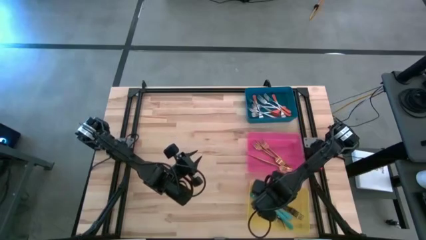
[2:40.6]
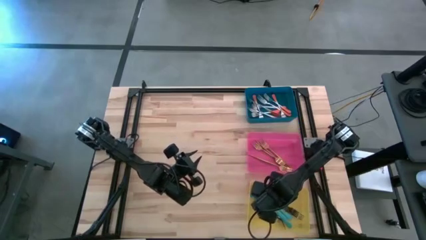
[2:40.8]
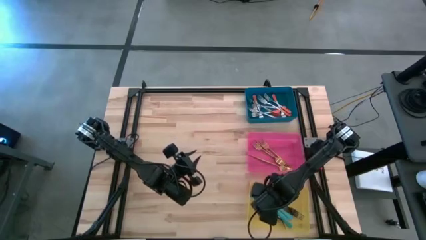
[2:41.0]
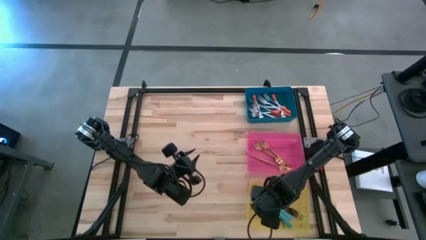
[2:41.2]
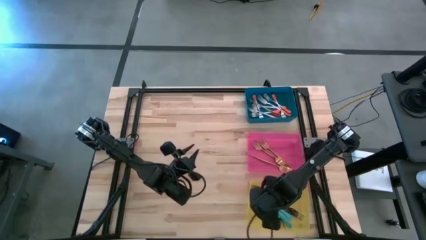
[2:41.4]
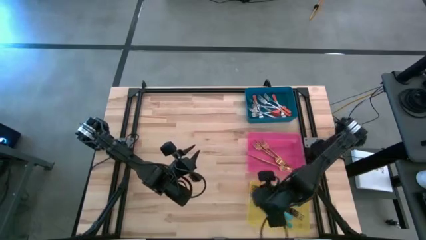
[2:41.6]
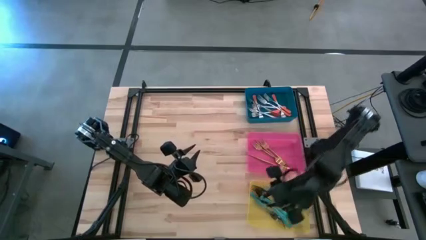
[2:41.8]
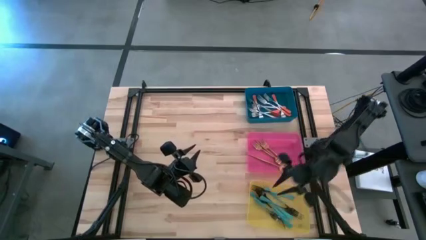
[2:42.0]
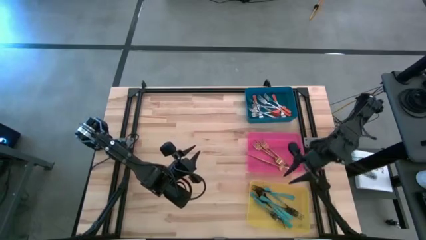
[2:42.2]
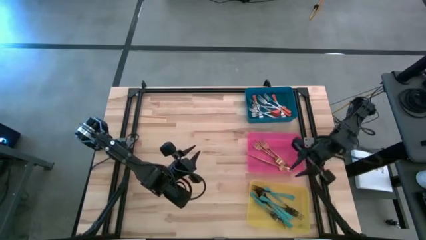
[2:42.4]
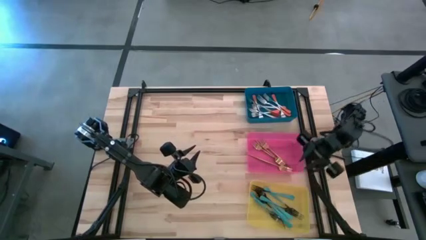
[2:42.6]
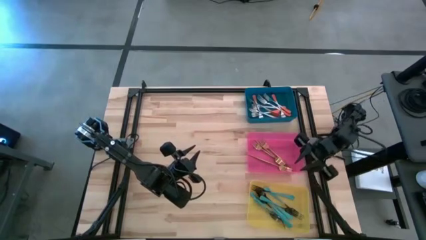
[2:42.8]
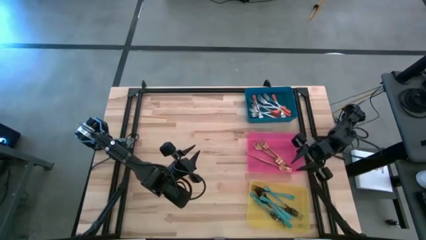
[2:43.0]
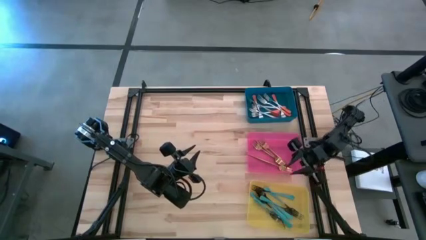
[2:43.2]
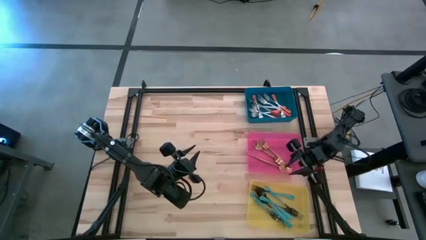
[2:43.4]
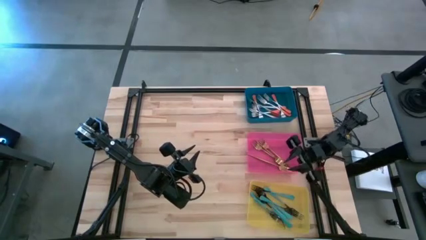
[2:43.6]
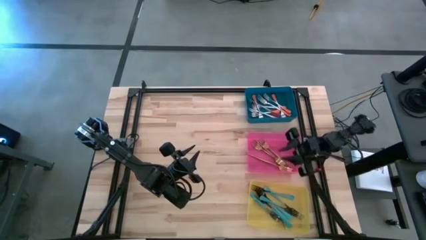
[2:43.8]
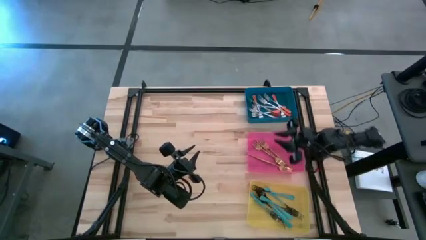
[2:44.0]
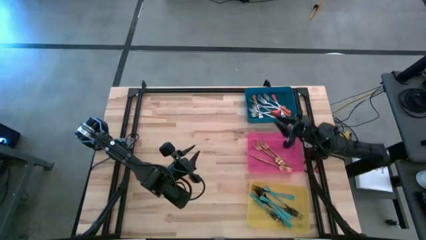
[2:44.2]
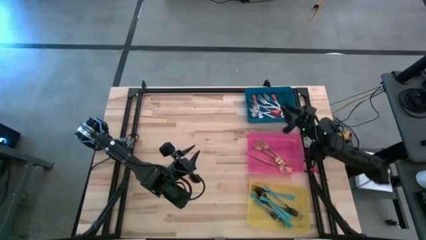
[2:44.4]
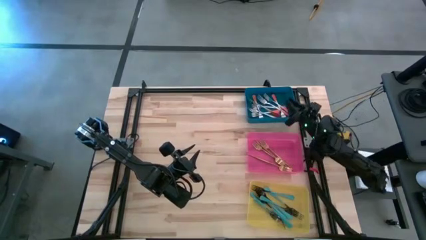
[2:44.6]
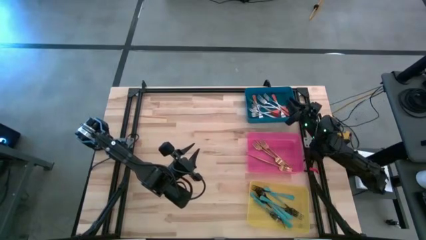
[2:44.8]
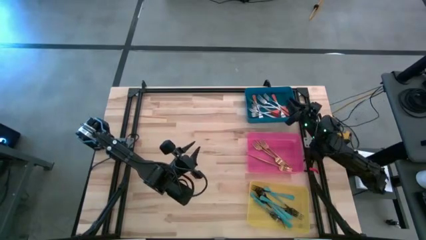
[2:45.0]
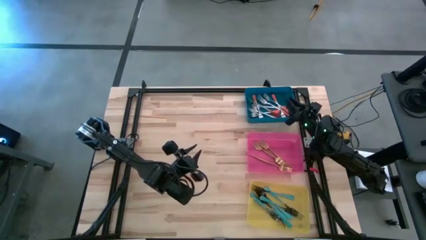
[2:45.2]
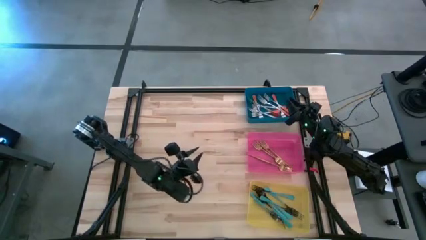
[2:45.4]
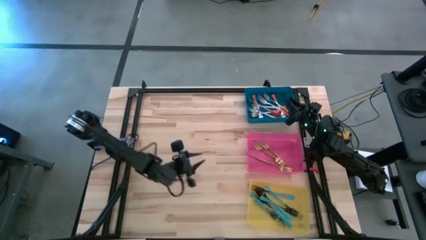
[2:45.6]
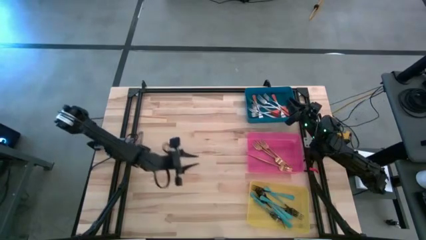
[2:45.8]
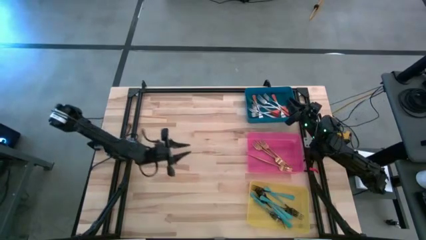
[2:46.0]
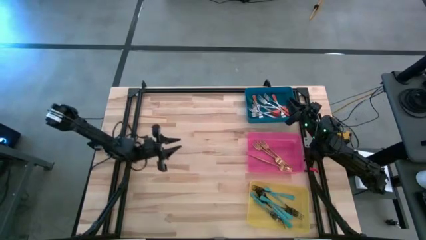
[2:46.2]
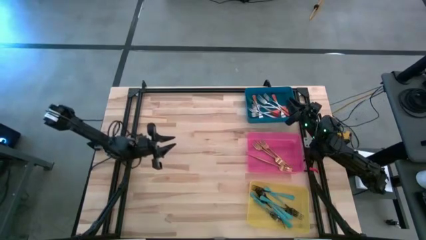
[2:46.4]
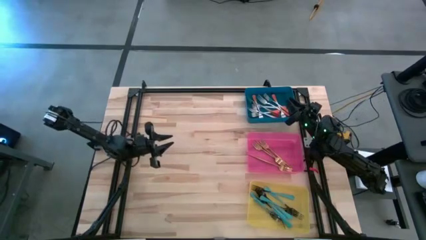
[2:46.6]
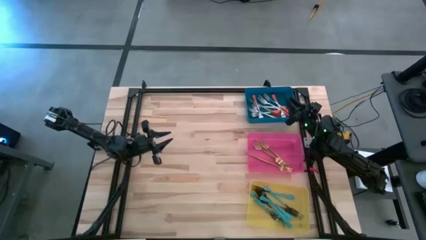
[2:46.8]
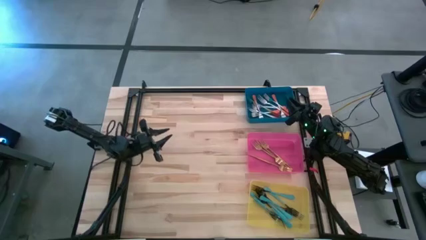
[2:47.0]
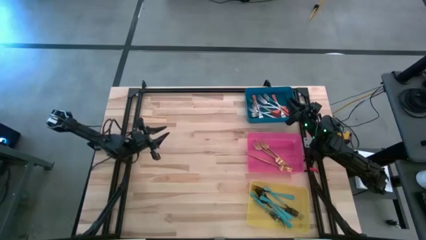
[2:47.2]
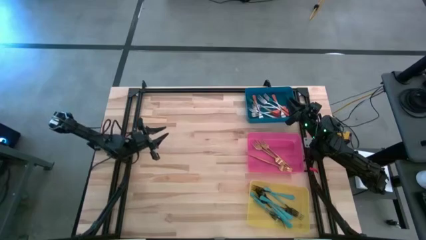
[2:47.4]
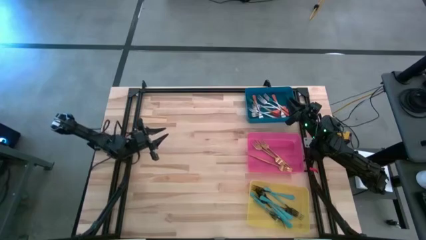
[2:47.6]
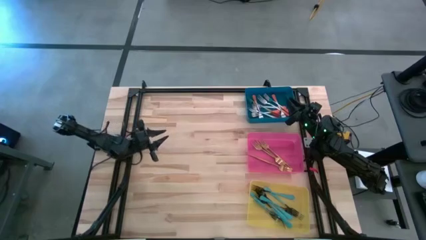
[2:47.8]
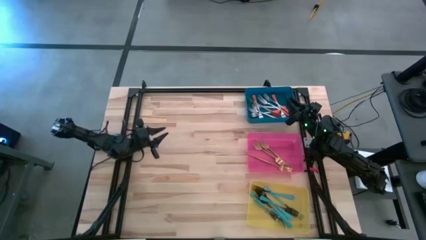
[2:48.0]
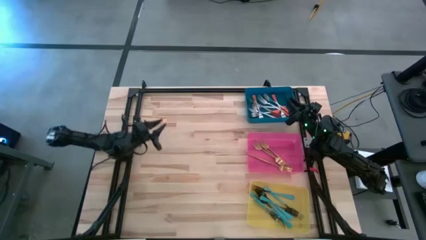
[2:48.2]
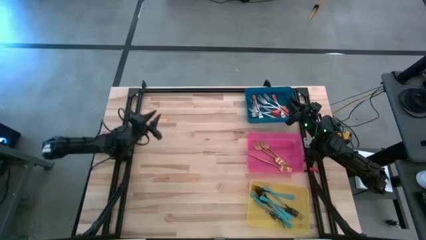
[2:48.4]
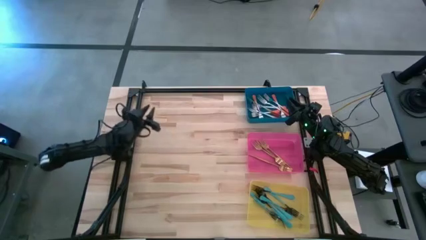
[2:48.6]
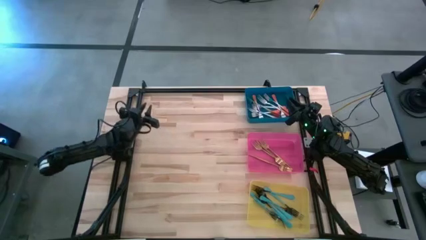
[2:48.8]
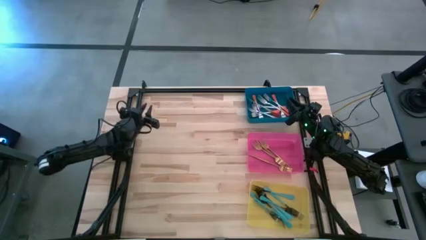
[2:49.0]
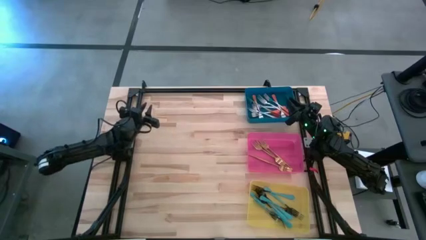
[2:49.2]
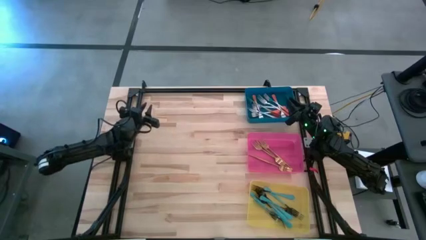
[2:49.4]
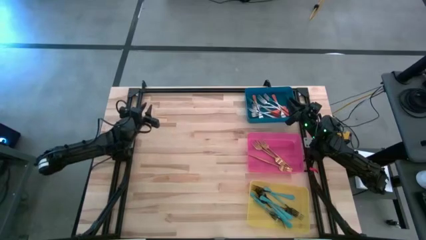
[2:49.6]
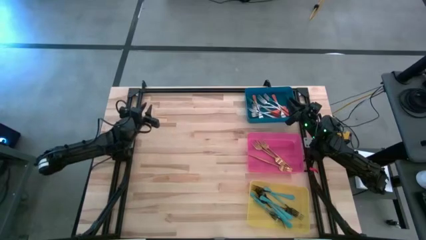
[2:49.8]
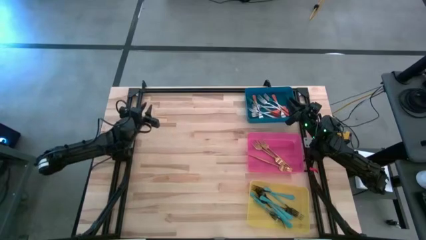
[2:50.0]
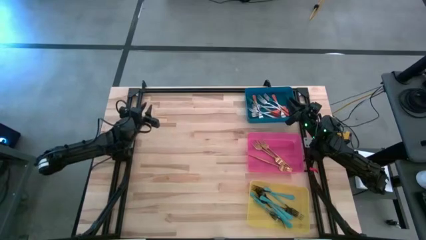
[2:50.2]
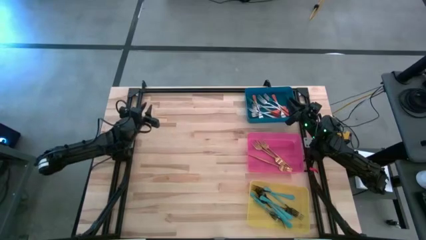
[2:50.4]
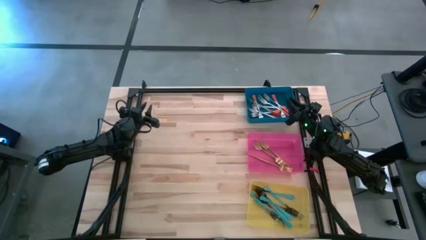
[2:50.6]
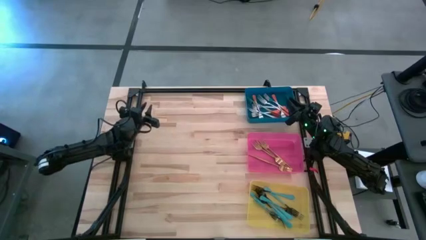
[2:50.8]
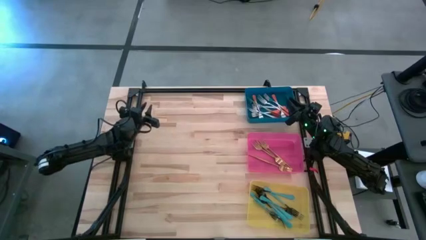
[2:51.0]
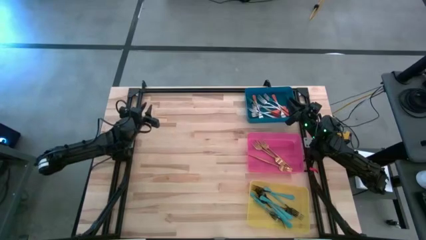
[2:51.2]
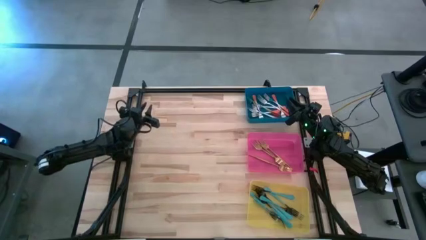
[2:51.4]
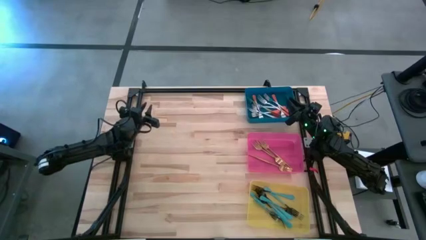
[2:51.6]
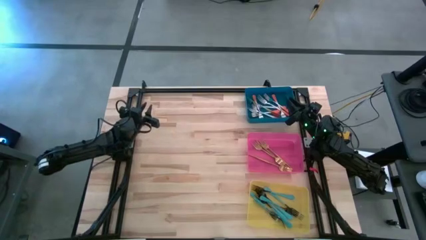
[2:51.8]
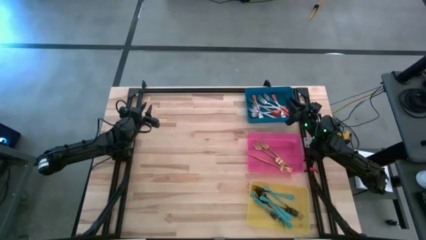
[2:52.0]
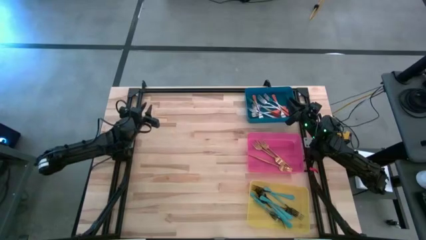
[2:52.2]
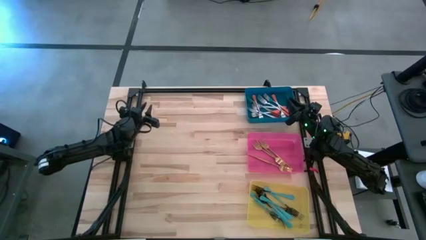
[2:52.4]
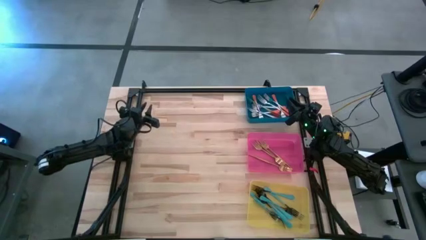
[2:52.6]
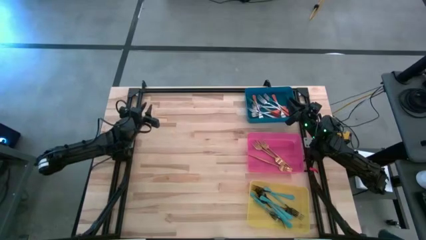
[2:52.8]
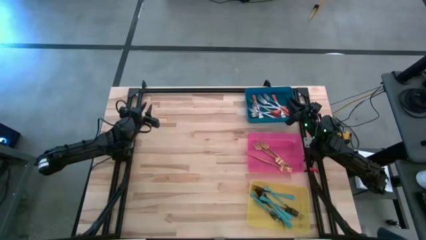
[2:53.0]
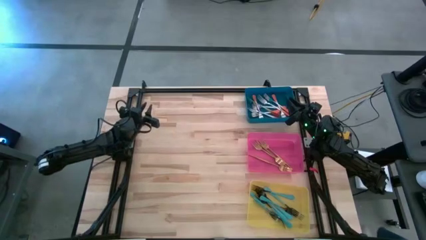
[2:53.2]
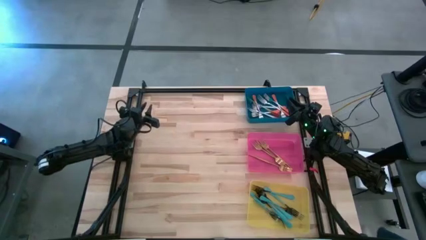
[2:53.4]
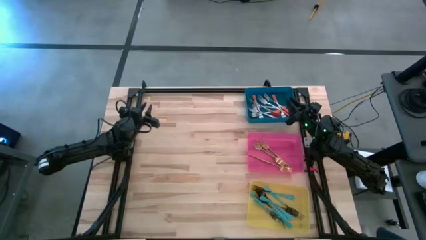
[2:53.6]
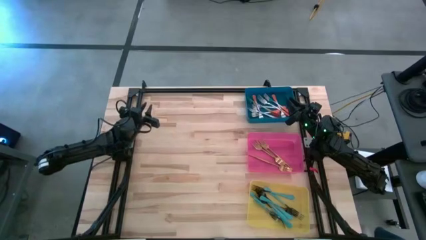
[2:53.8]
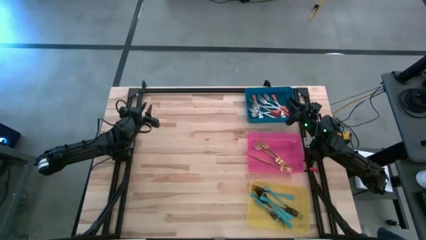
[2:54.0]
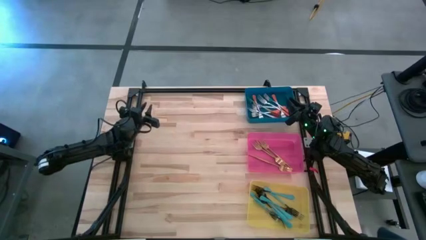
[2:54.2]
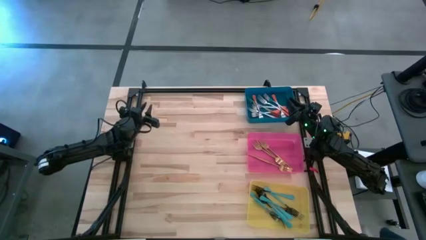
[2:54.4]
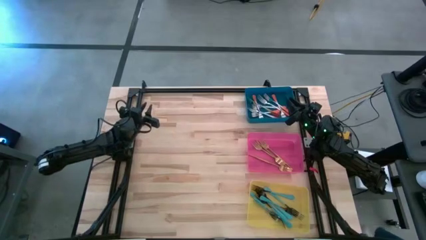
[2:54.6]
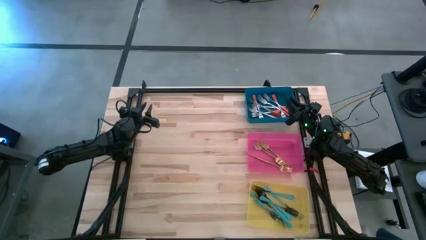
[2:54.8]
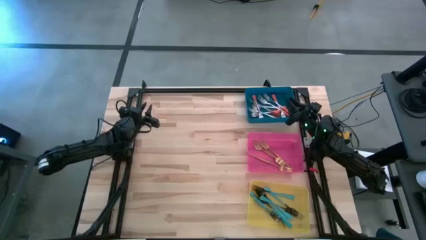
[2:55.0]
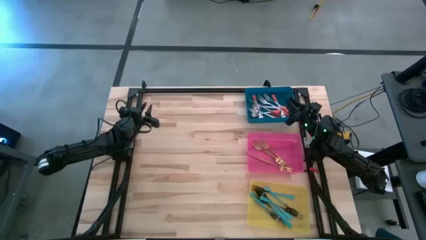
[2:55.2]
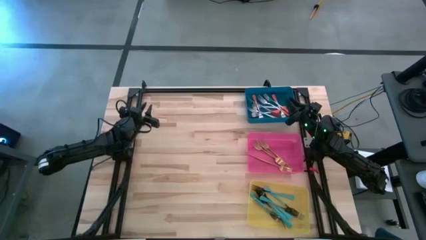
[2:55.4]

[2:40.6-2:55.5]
Task: Sort silverware by color (type)
Return to Home Position

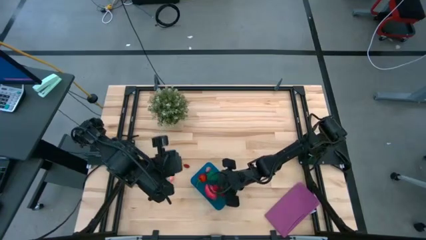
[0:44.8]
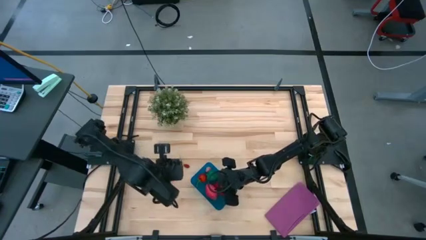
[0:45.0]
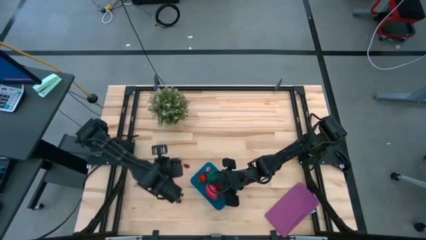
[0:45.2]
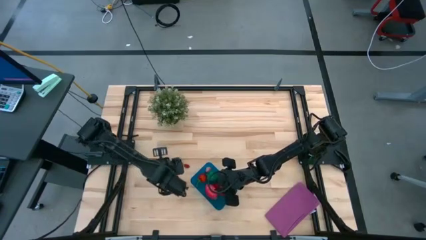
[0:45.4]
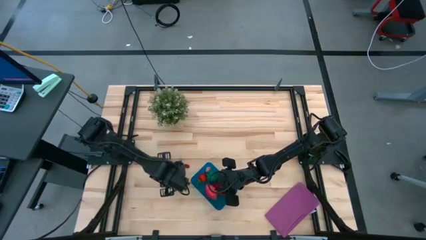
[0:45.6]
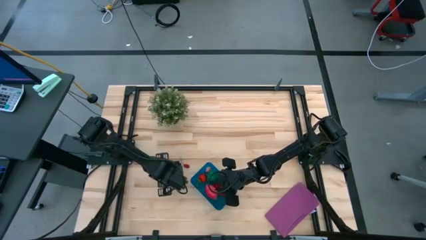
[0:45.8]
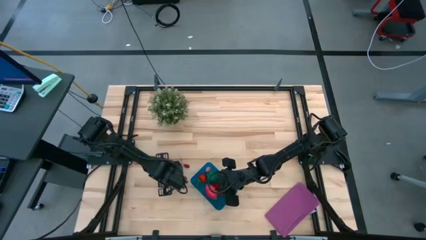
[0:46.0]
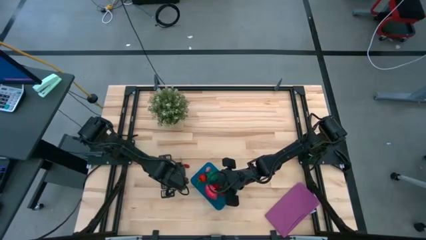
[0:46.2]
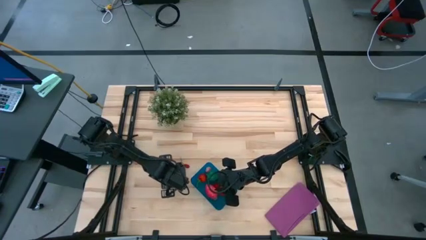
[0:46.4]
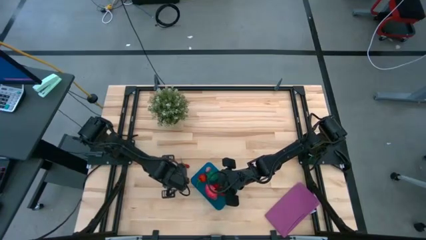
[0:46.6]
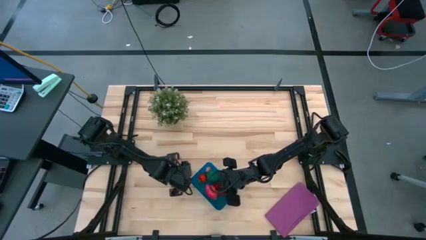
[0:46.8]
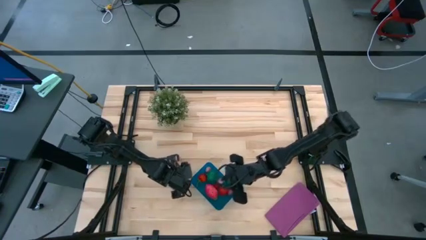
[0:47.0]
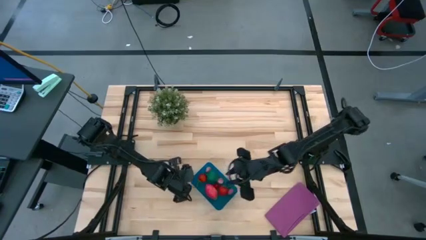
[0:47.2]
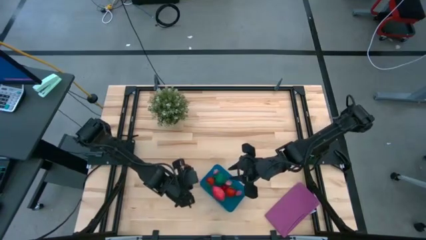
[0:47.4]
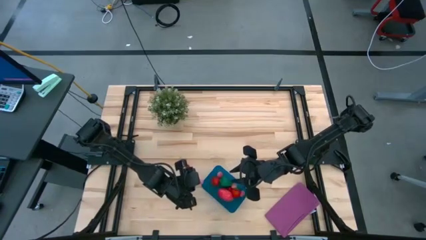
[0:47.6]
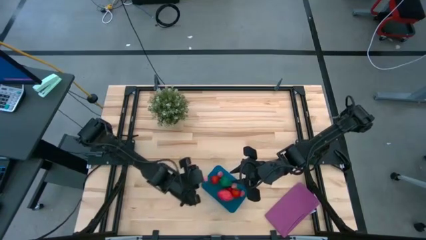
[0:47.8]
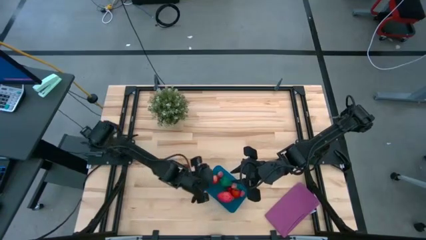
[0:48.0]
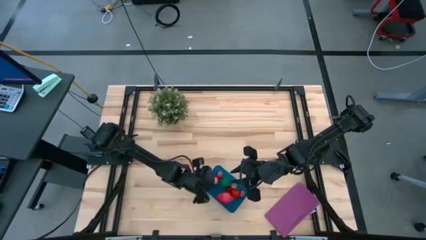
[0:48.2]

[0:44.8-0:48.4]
Task: Pick and placing Produce into tupperware
Put the pink peach into the blue bin
